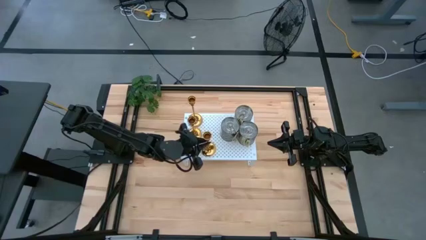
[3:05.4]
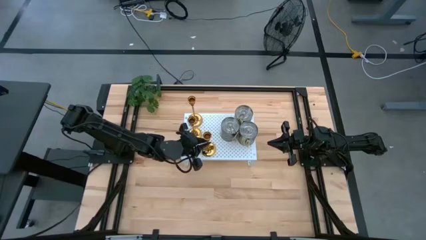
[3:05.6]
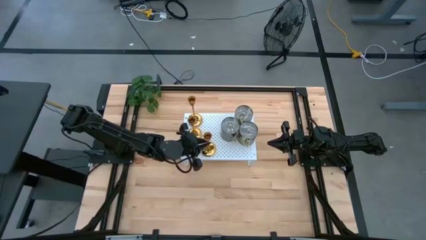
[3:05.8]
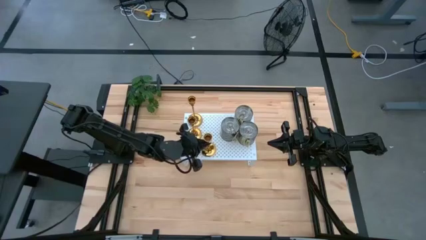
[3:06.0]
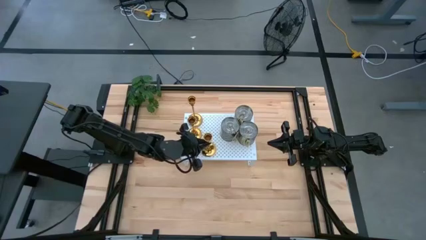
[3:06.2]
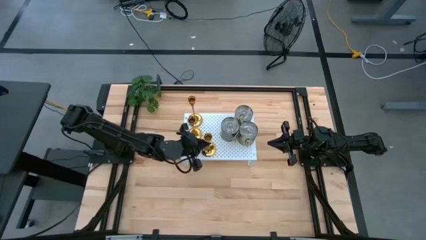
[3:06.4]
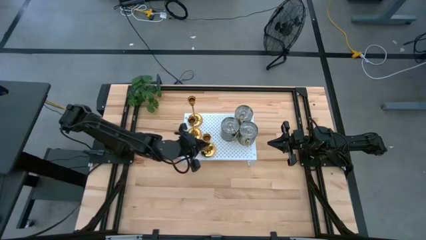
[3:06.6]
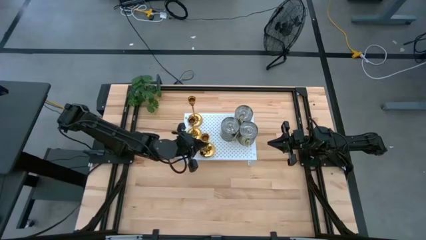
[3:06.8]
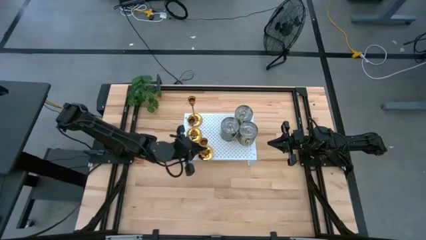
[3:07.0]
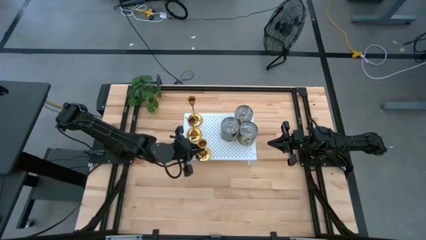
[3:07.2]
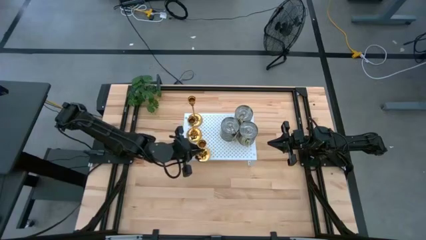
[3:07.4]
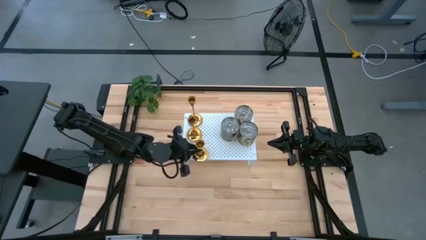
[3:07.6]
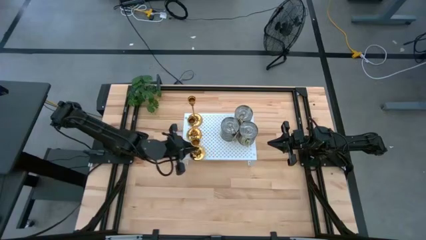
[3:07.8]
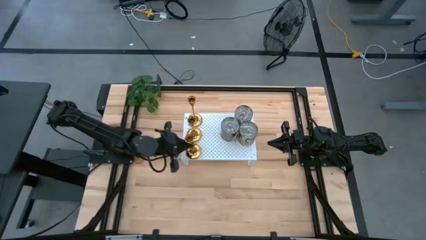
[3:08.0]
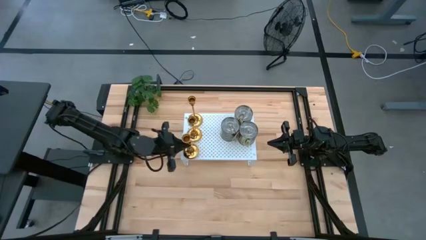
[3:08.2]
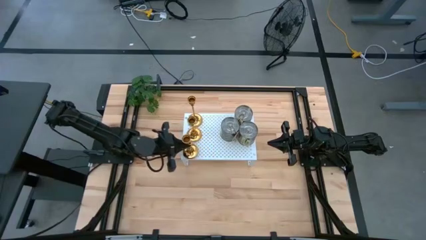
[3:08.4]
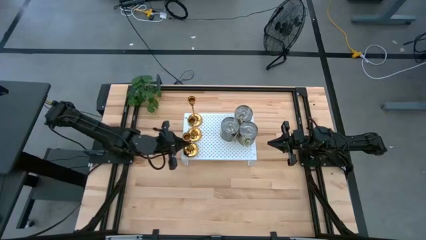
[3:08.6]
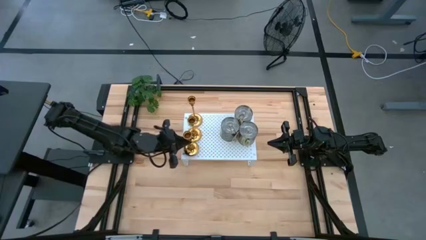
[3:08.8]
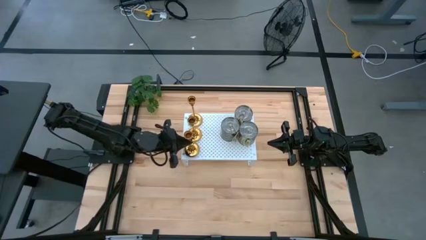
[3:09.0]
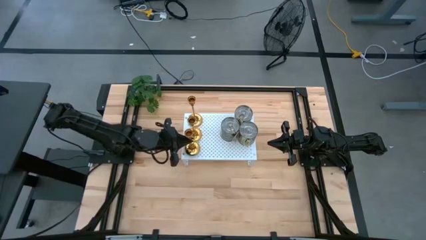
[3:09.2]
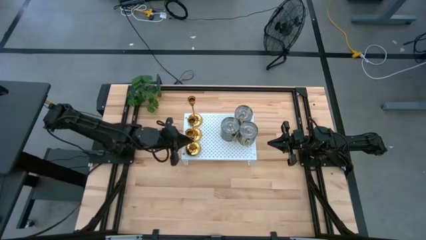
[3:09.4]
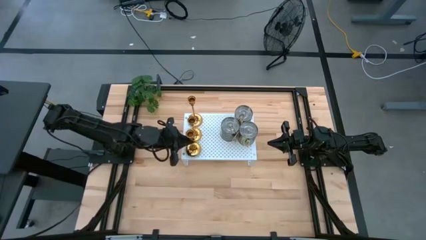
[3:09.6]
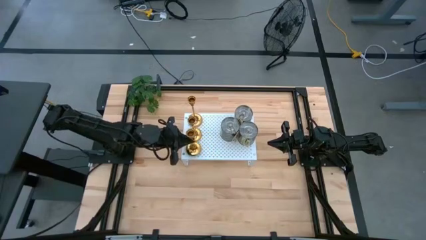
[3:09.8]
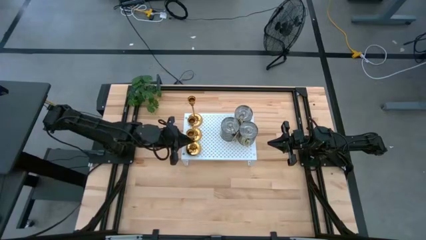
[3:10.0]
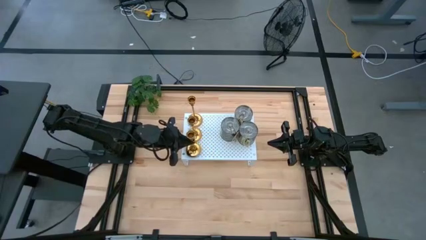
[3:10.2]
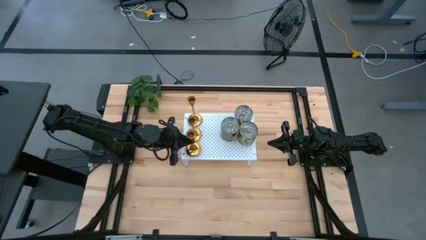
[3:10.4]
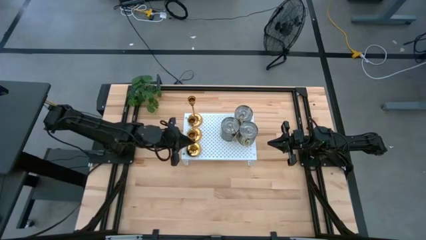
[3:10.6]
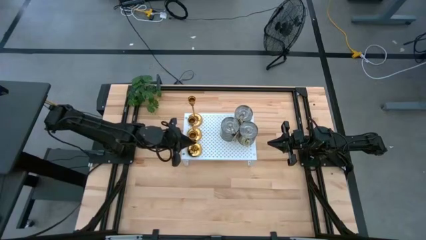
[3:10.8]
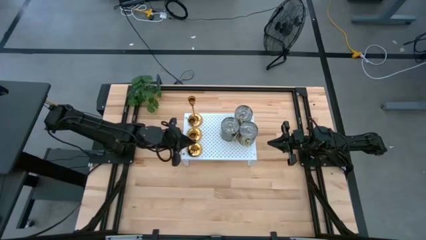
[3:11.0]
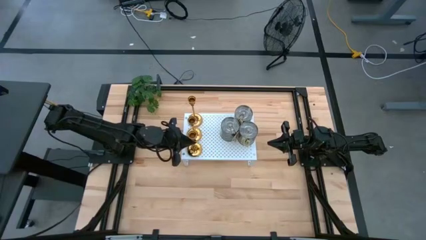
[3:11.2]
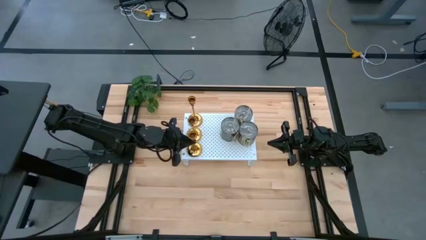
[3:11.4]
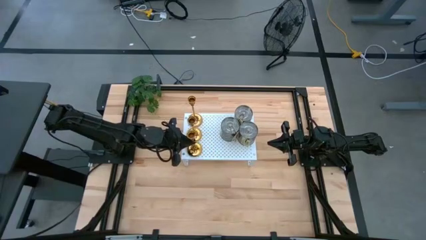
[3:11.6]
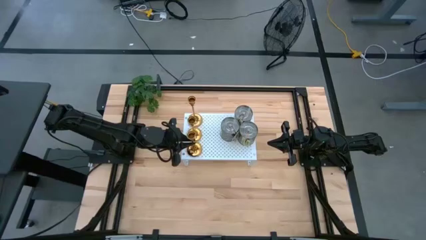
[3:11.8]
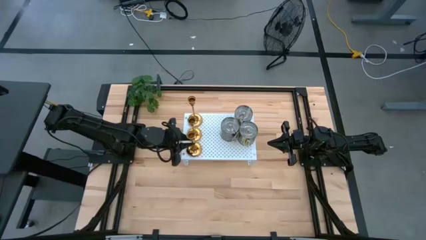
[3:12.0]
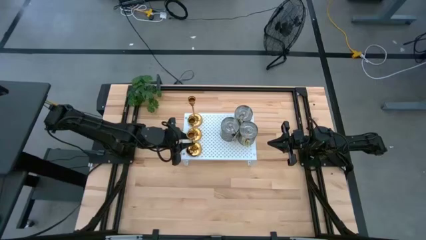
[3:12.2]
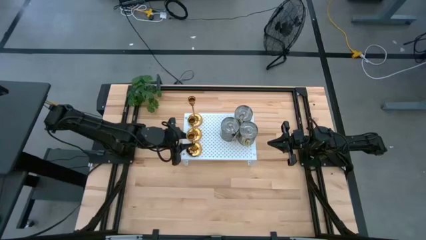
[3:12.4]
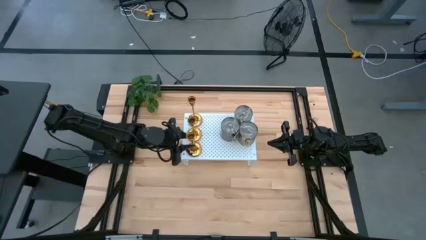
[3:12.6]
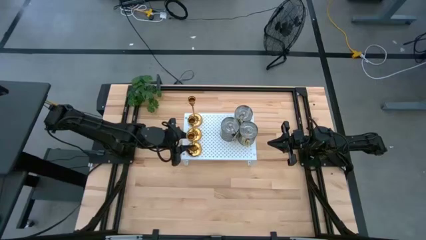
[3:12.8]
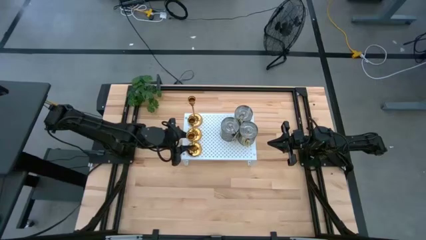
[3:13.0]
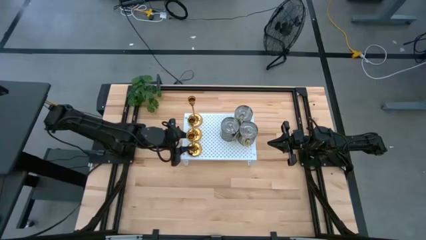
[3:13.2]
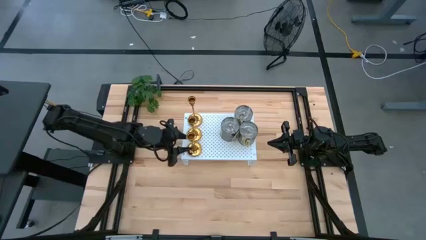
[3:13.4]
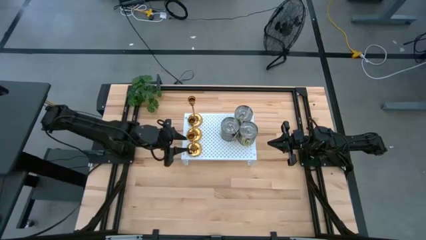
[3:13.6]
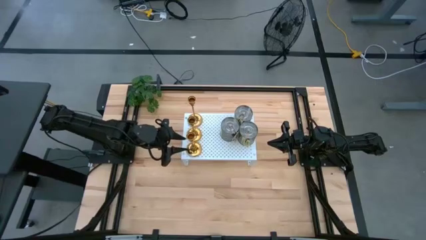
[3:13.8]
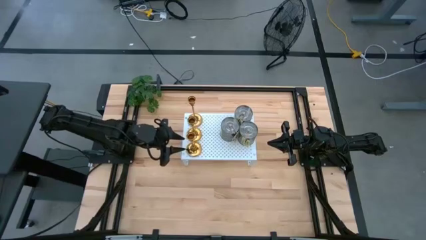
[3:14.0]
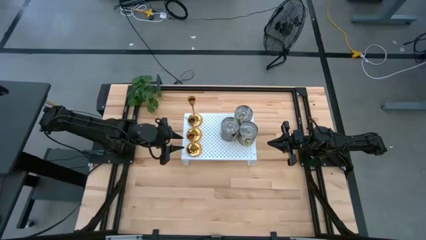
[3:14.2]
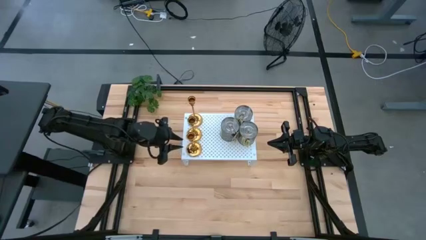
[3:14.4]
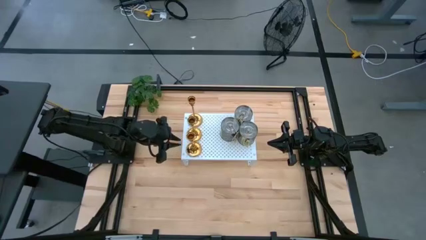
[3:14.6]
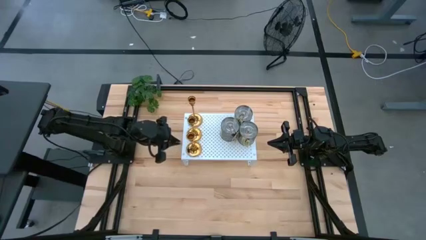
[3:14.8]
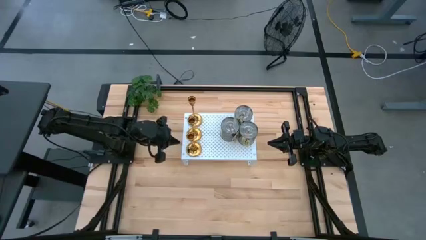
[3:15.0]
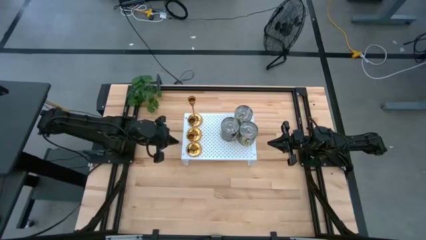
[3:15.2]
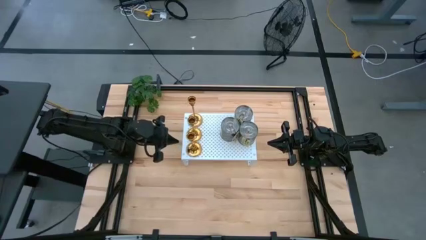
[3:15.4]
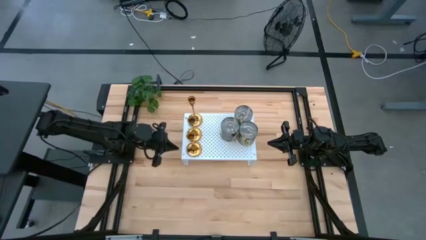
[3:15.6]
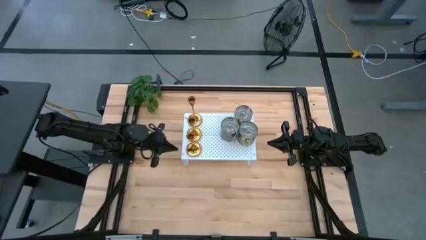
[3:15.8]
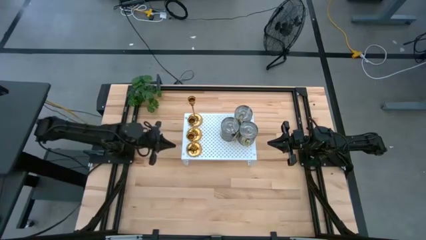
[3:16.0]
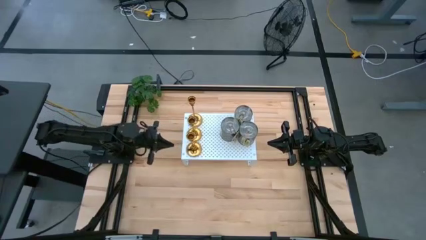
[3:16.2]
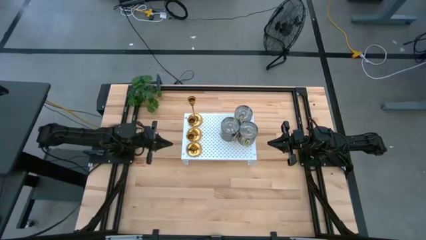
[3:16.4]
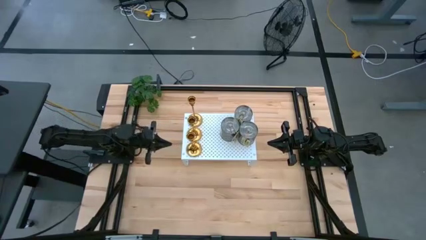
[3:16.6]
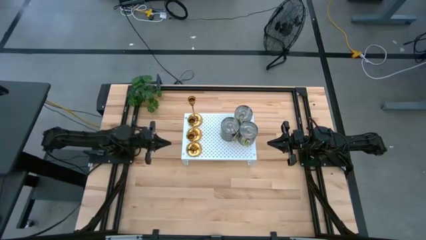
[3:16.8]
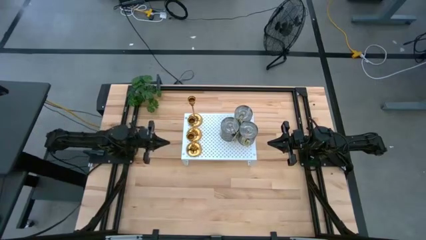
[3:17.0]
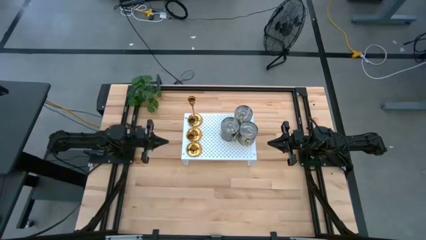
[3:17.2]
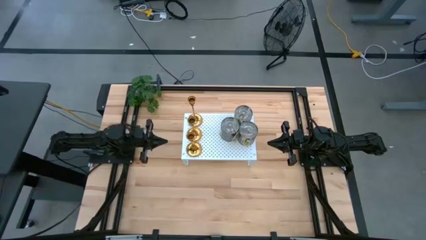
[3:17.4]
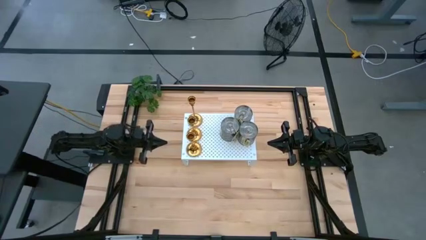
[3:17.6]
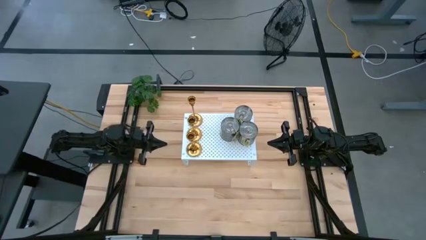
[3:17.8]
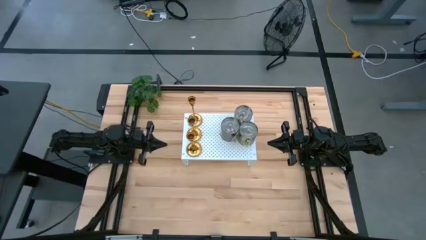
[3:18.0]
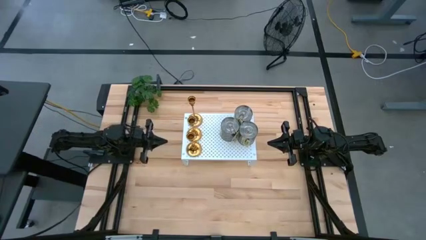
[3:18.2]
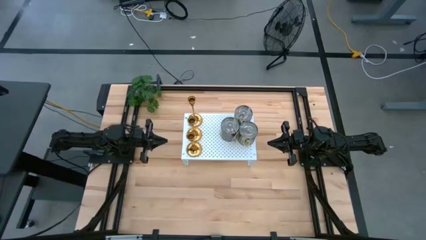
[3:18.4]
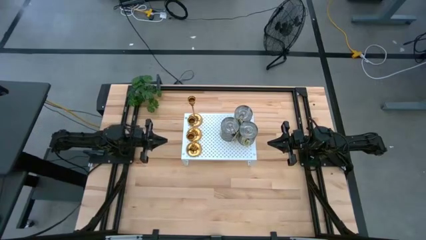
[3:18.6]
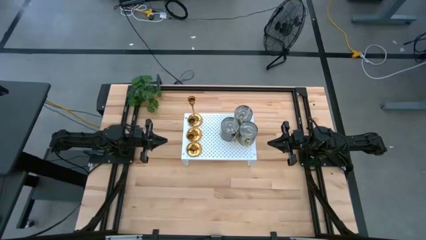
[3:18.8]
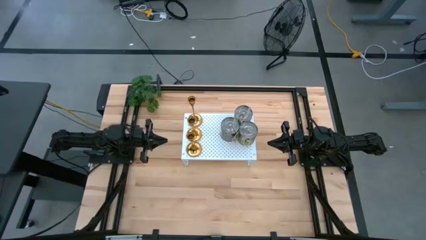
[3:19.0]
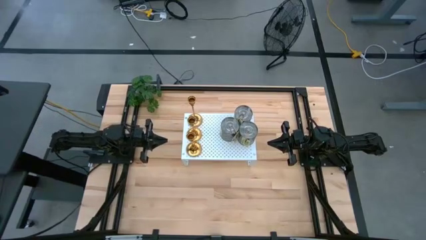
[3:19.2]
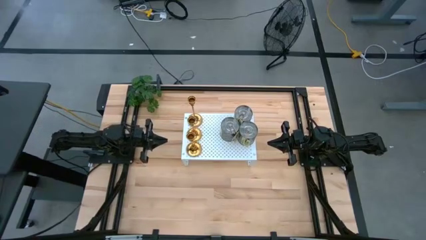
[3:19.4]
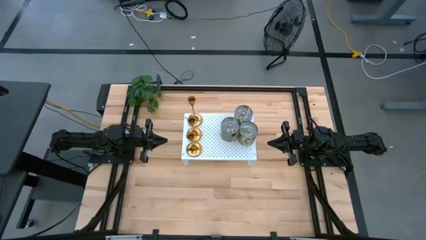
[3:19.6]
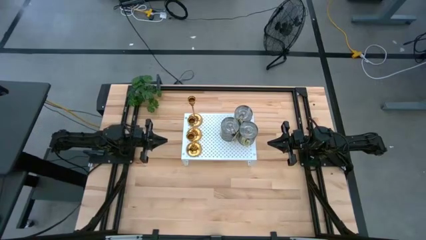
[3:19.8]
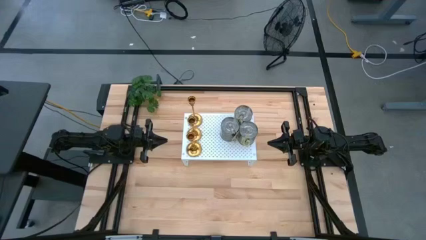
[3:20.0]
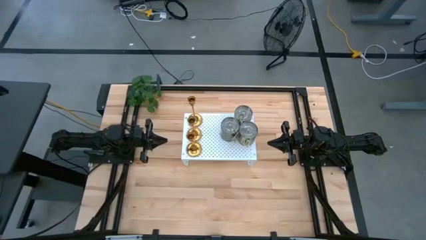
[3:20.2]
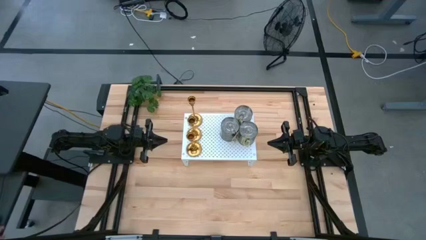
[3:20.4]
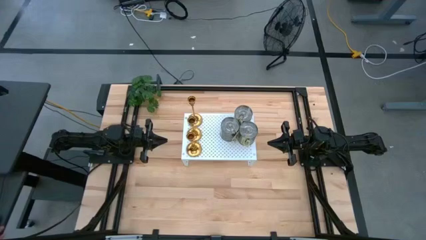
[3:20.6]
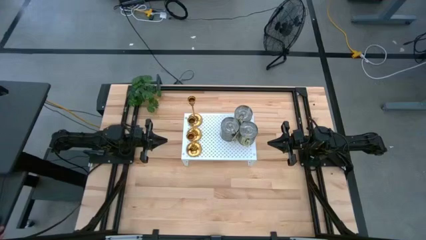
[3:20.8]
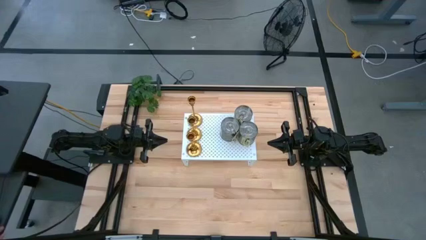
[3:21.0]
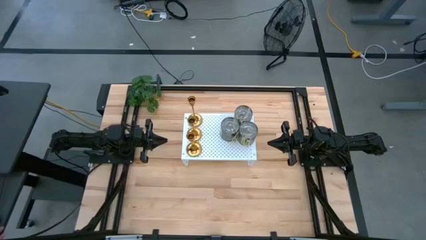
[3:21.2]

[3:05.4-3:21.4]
Task: Pick & Place candle stick holders
Return to Home Position

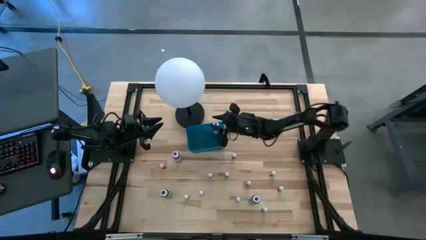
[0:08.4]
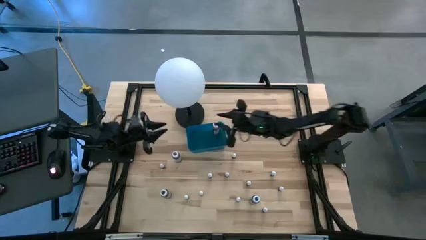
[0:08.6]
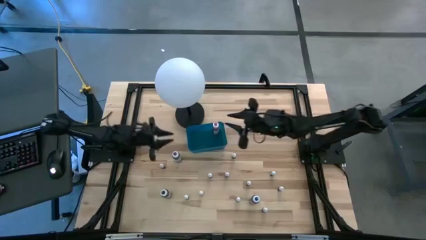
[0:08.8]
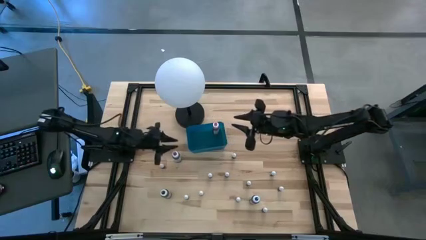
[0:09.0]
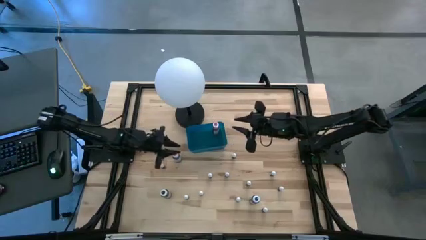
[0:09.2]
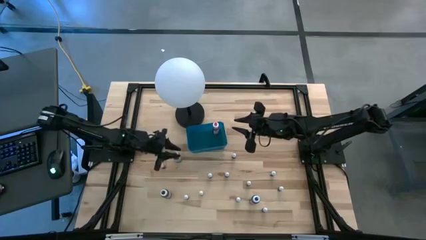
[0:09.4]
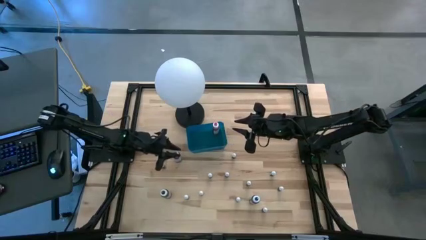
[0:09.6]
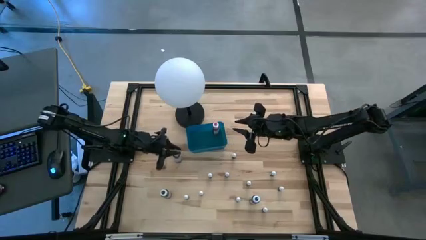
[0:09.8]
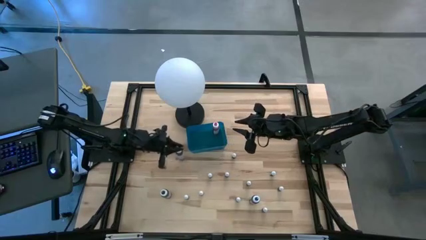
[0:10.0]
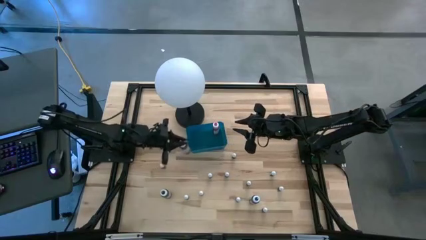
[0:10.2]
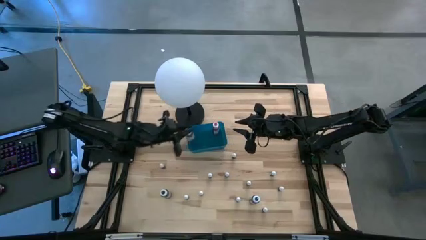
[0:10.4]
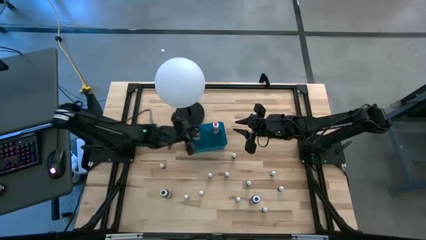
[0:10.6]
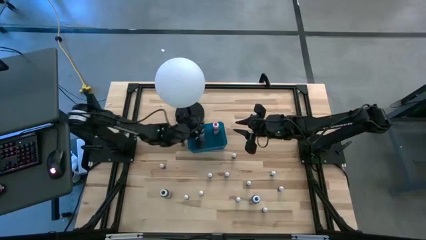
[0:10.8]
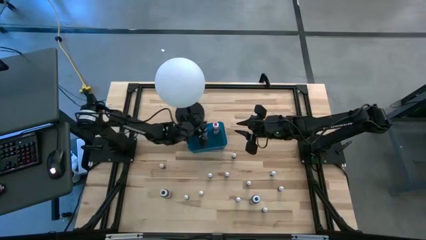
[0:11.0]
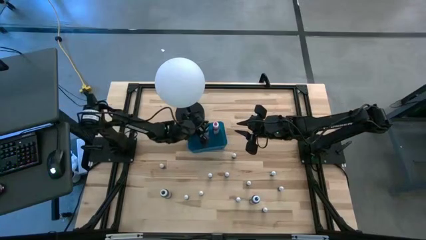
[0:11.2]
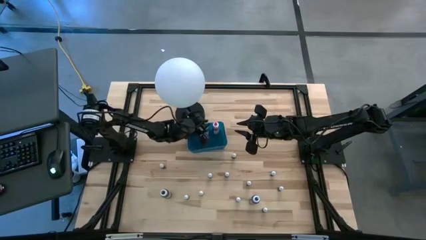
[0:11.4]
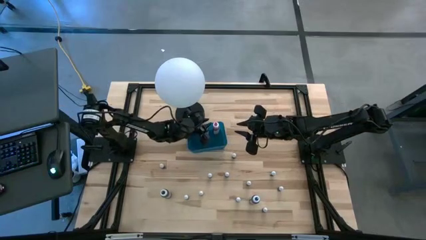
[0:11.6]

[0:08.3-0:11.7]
Task: Pick & Place food coloring
Put the large violet food coloring bottle into the blue container
